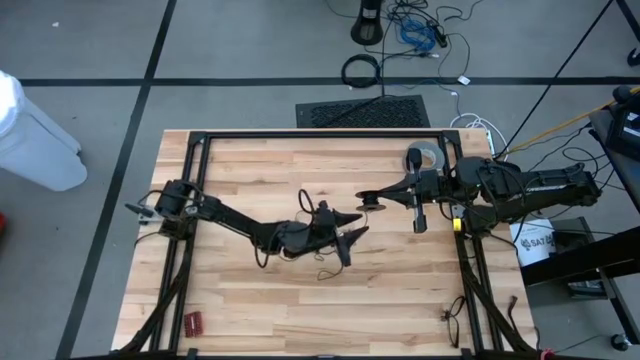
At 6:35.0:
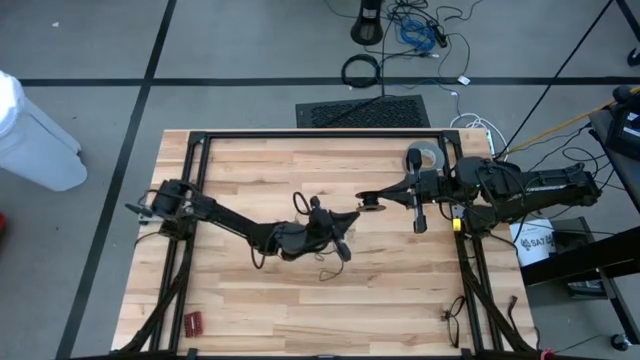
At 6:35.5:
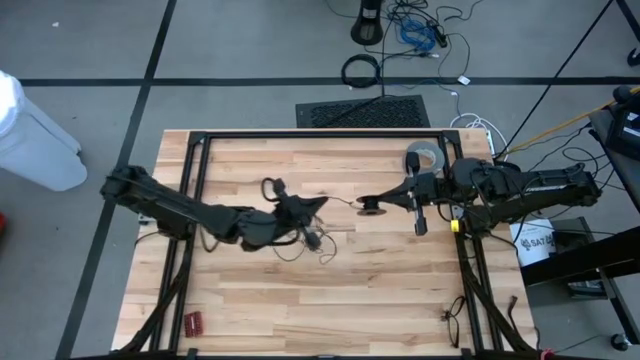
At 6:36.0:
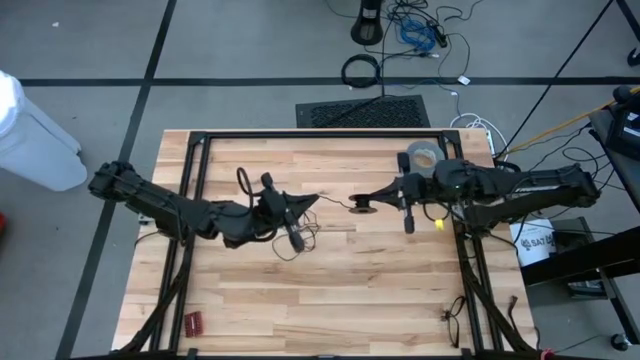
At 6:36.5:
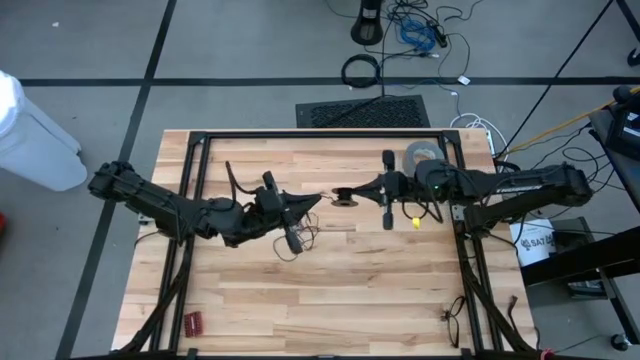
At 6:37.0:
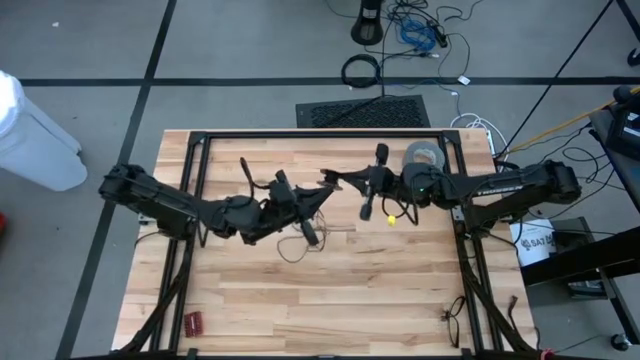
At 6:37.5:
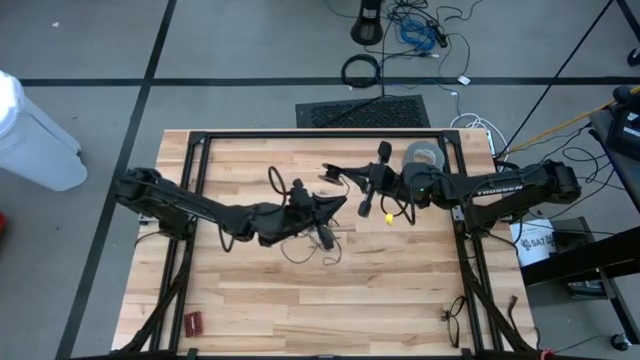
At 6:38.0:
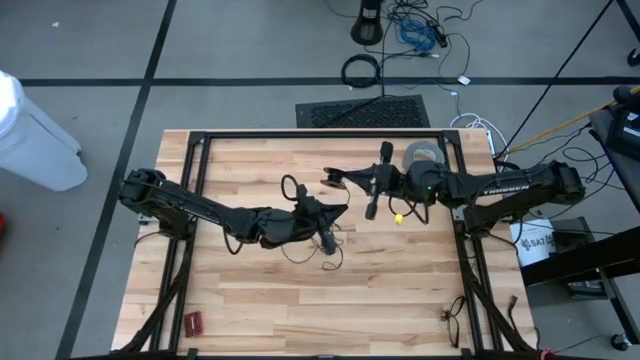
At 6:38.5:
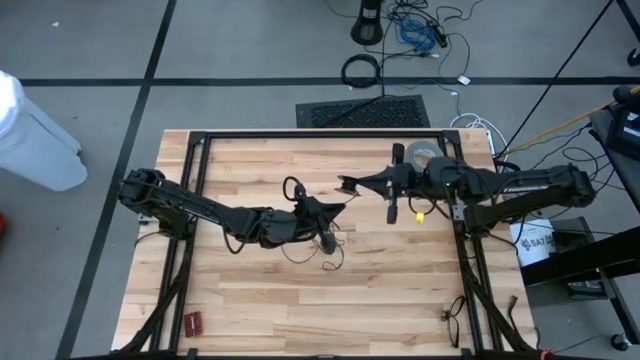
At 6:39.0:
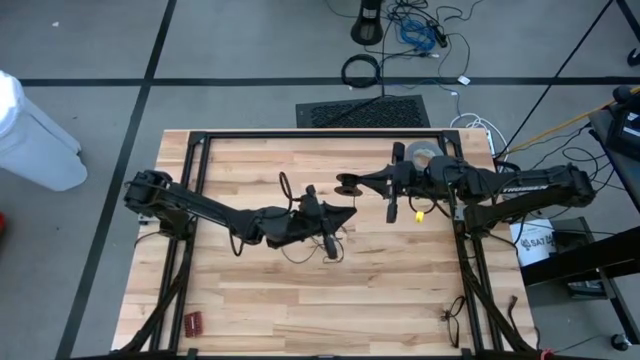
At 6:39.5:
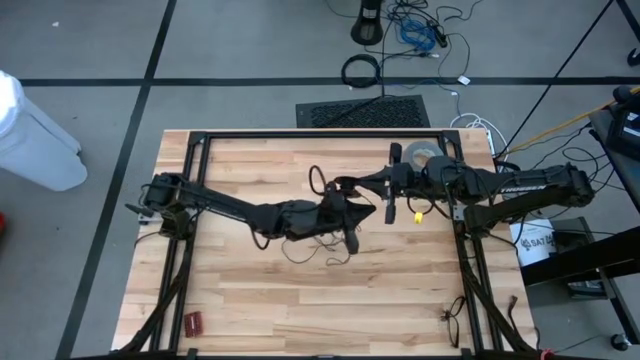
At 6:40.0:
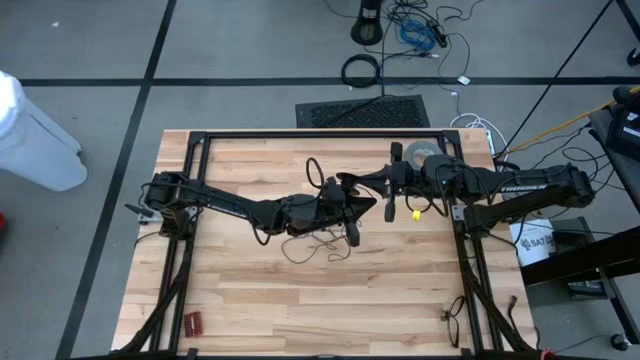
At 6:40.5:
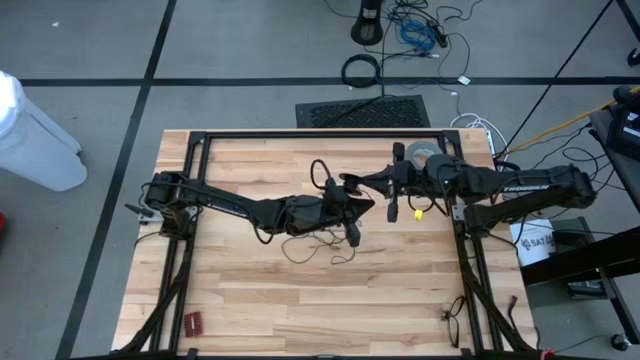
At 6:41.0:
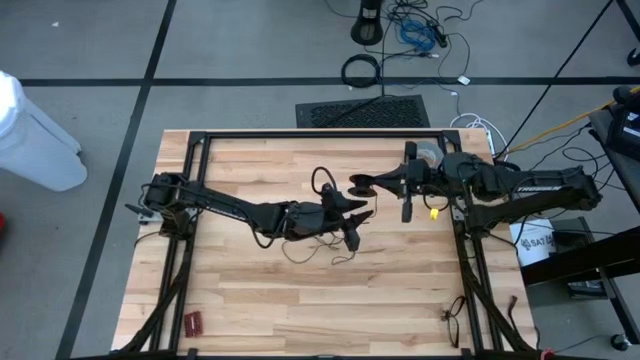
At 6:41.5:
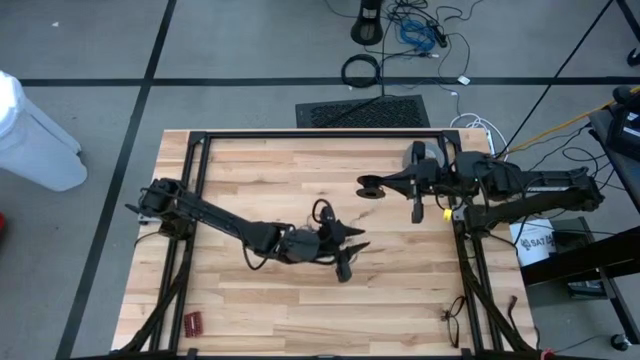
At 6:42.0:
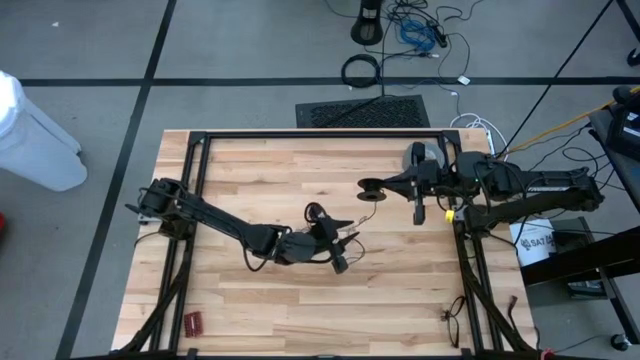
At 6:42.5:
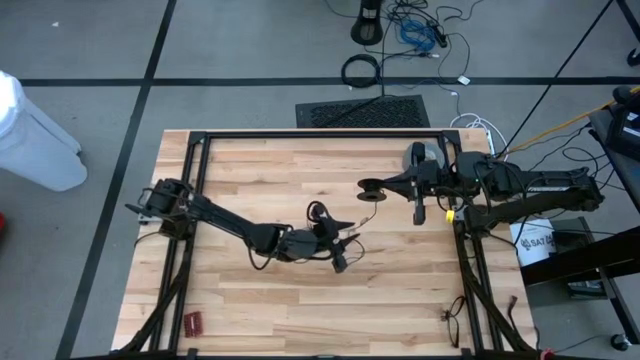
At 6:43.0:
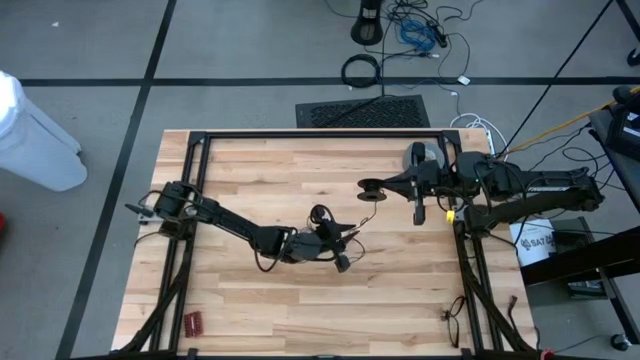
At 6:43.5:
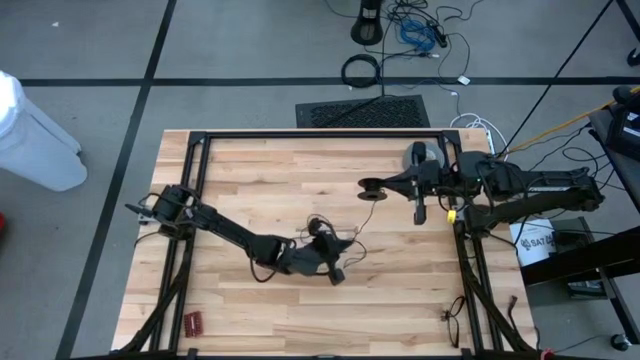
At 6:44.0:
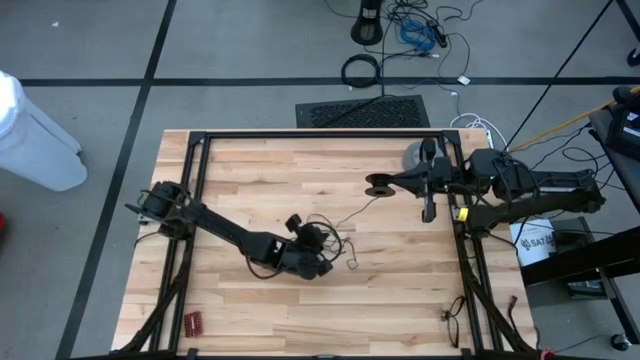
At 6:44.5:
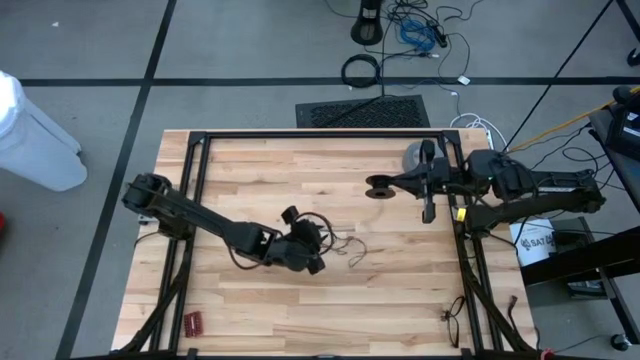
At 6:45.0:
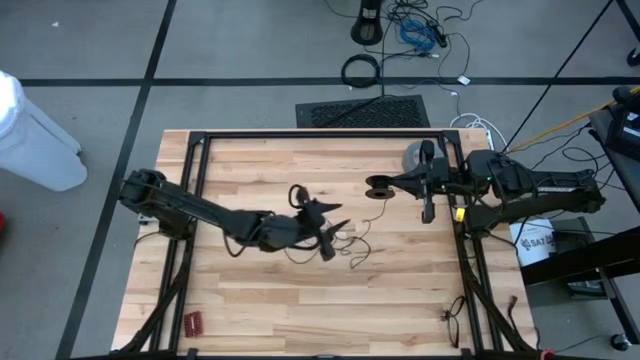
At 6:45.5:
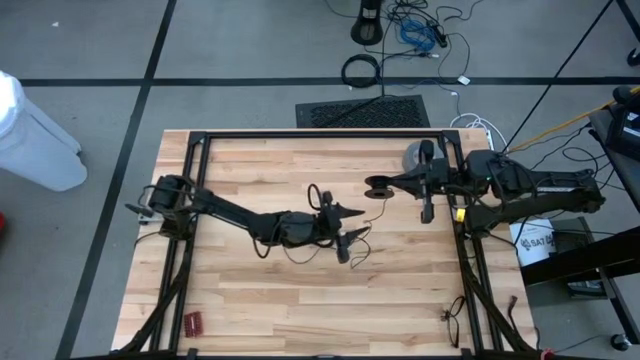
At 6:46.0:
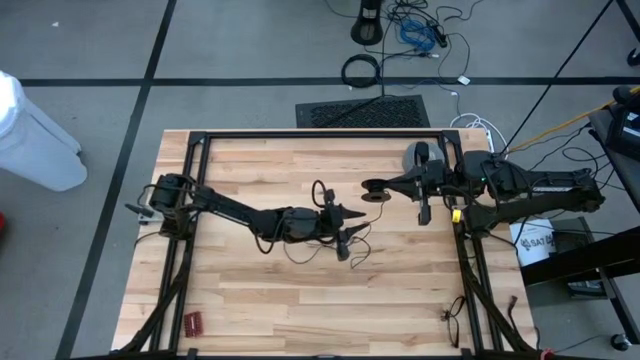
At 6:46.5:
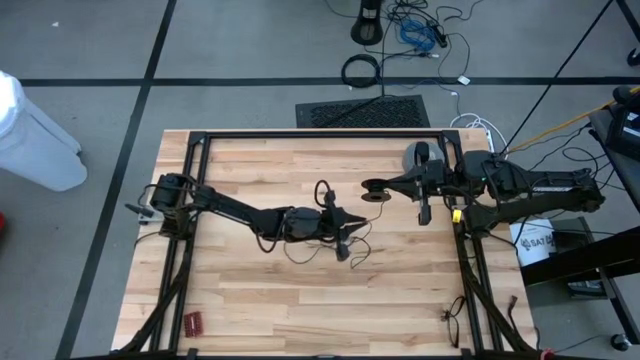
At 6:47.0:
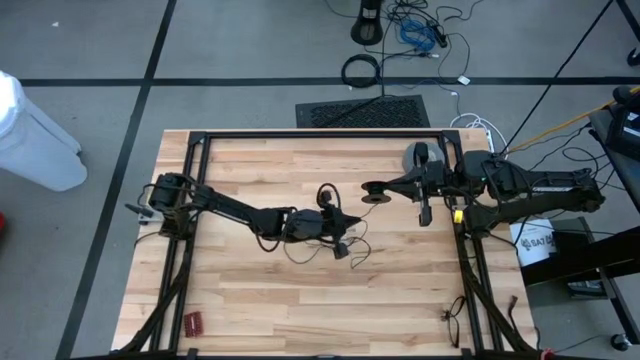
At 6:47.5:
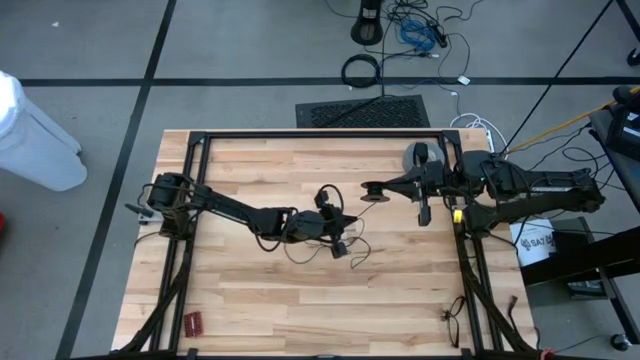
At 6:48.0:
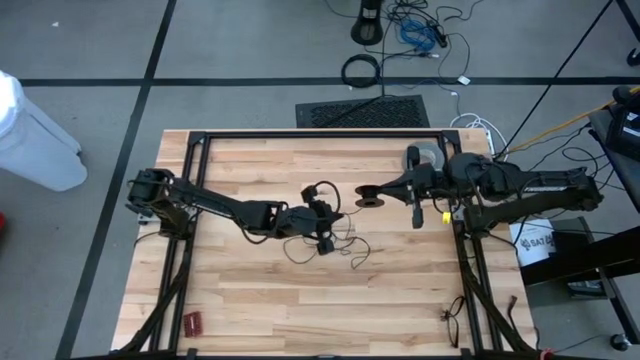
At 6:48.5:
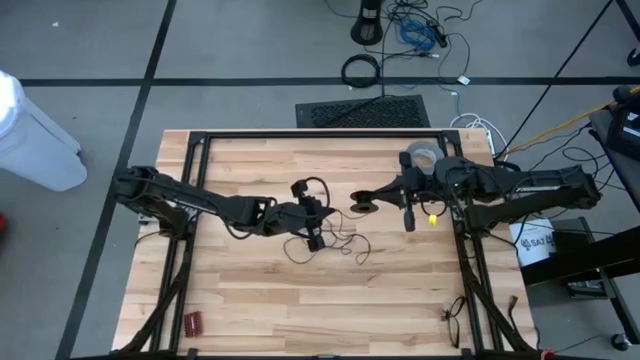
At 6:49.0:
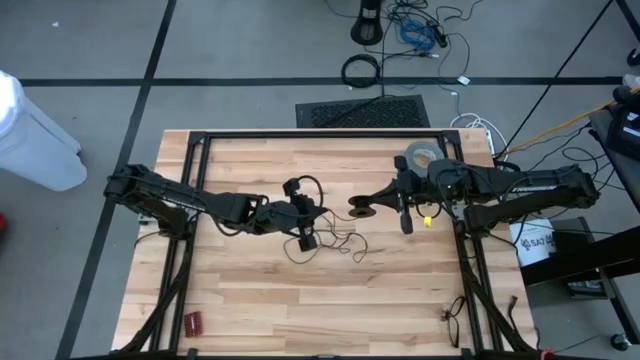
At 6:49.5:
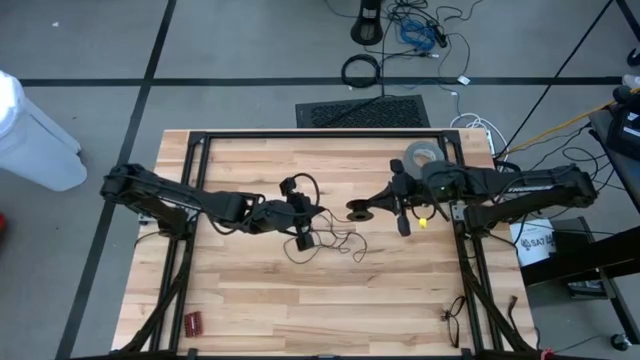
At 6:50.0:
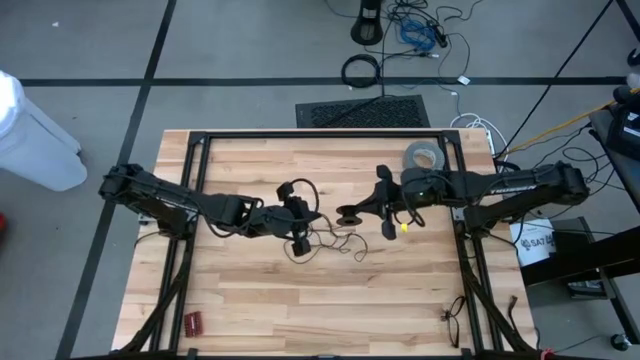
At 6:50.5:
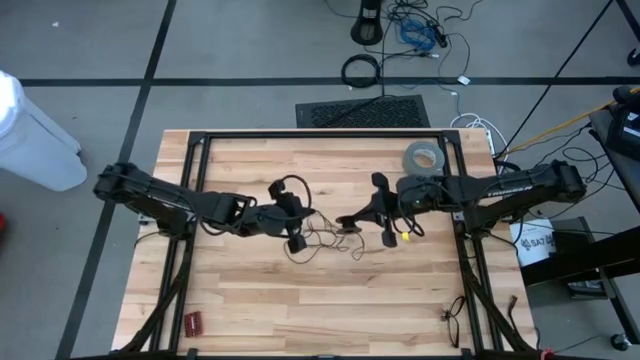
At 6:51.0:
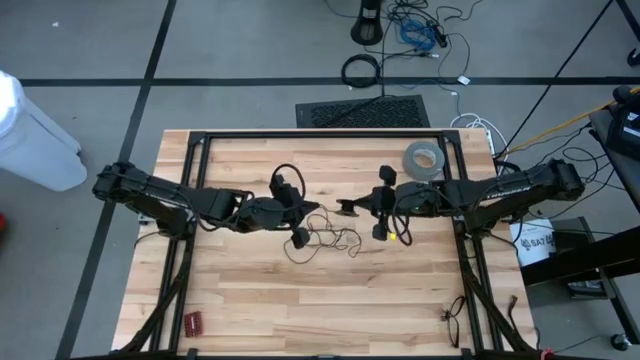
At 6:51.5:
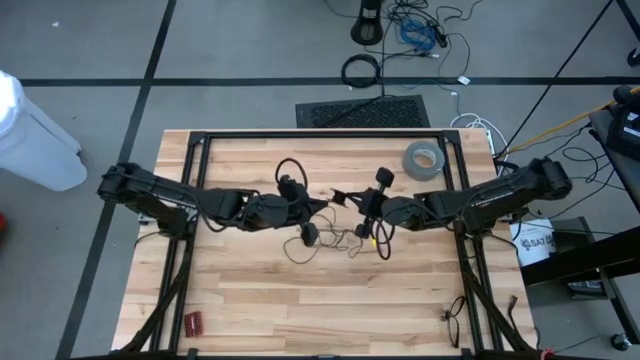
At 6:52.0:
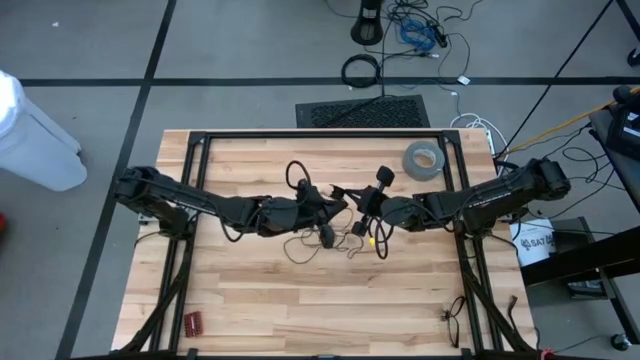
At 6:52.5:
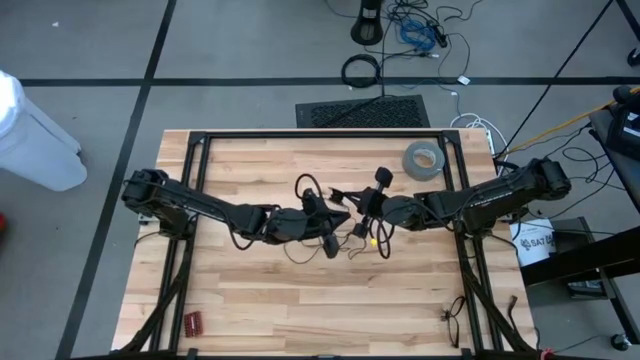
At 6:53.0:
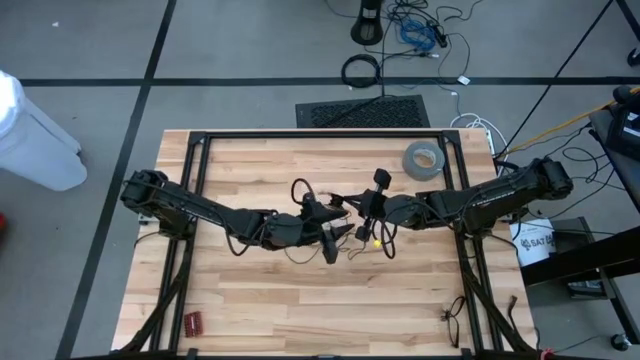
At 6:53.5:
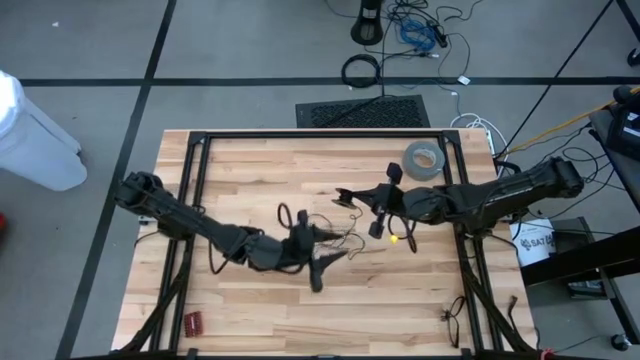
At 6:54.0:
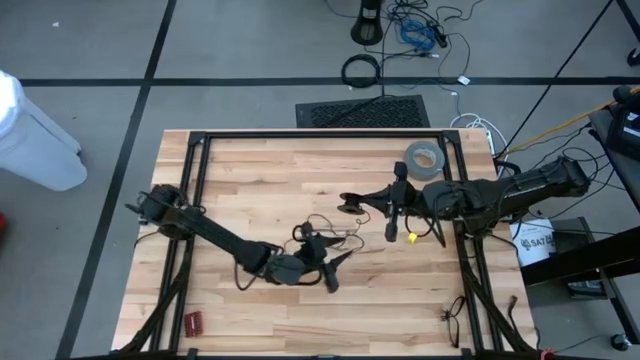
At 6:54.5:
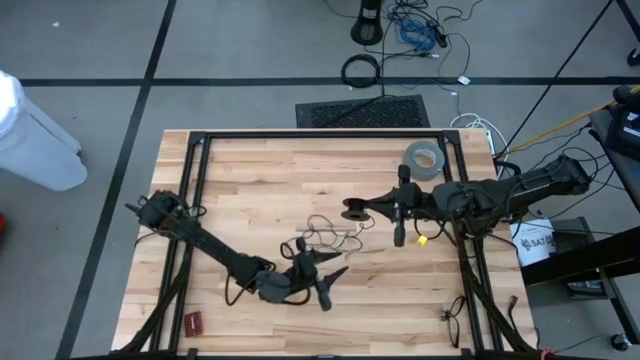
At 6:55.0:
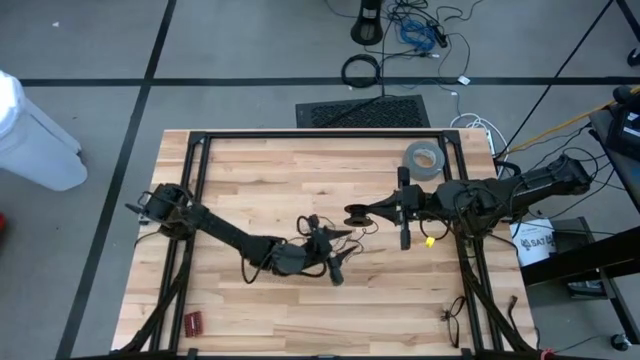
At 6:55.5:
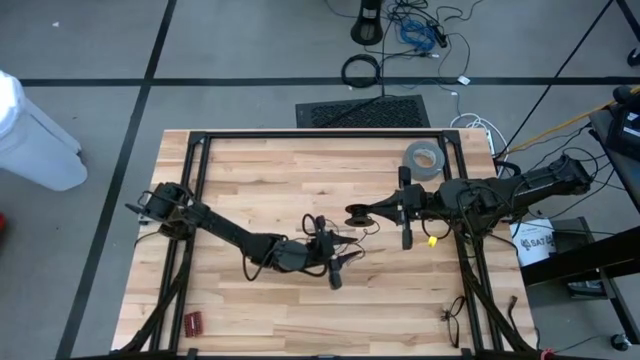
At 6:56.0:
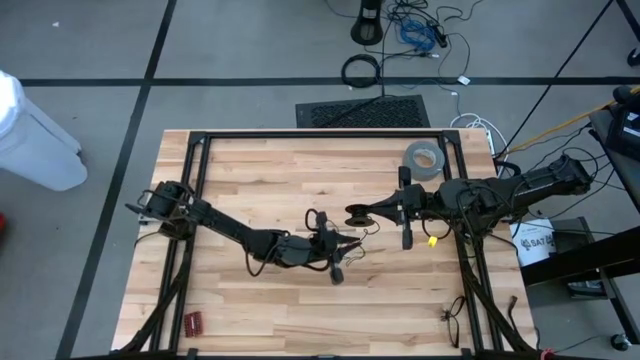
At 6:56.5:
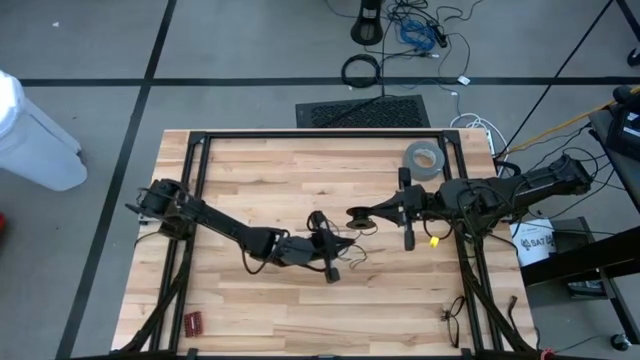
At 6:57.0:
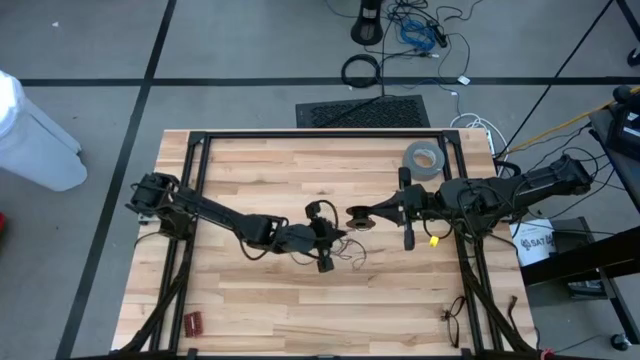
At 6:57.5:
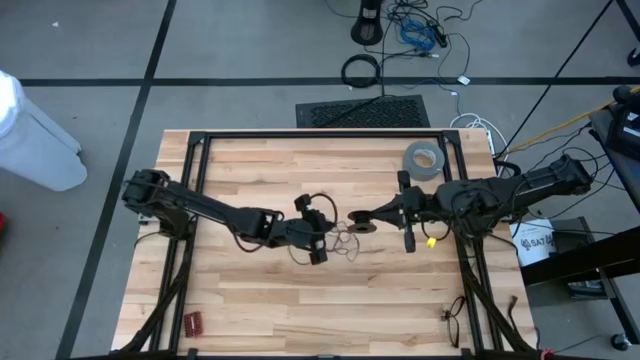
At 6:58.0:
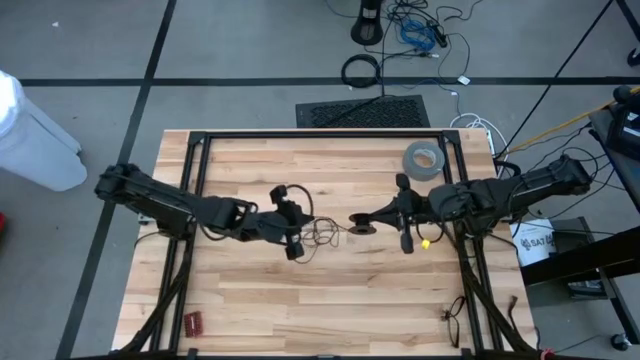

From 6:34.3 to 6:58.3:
Task: Coil cords
Coil the black wire onto the spool
